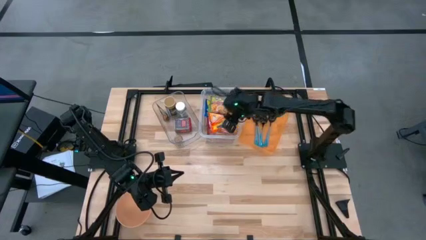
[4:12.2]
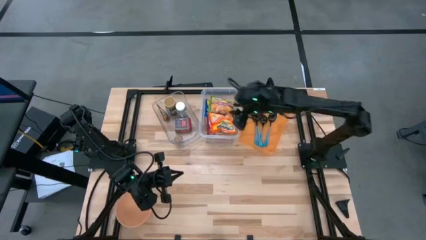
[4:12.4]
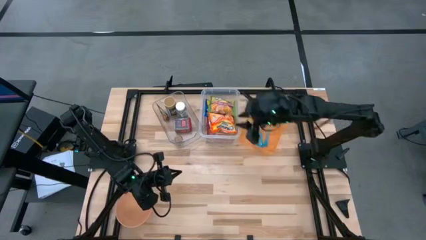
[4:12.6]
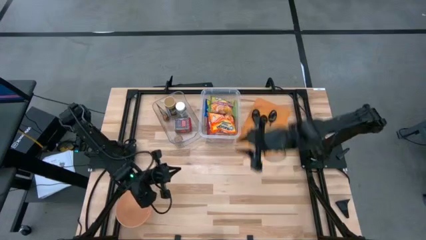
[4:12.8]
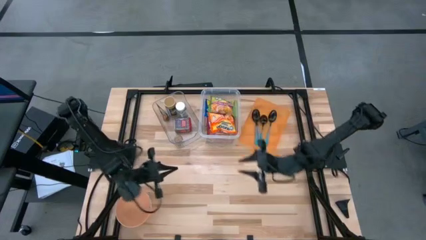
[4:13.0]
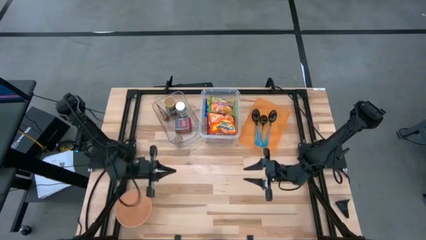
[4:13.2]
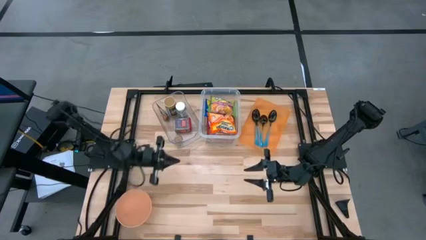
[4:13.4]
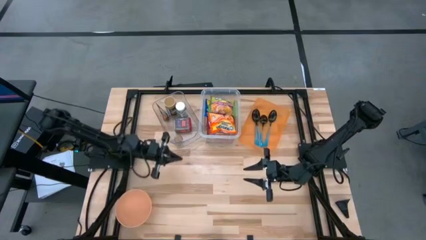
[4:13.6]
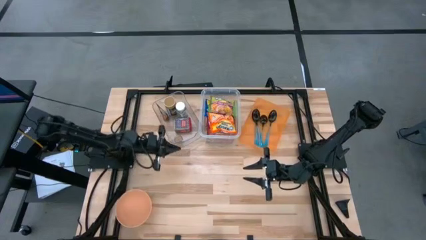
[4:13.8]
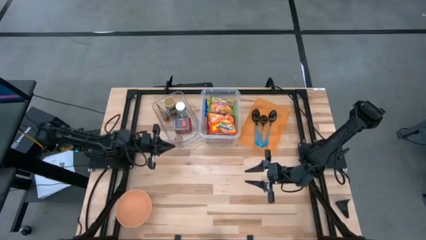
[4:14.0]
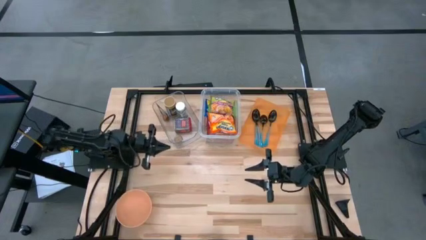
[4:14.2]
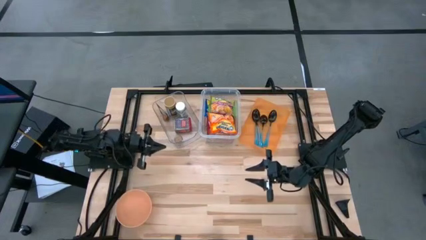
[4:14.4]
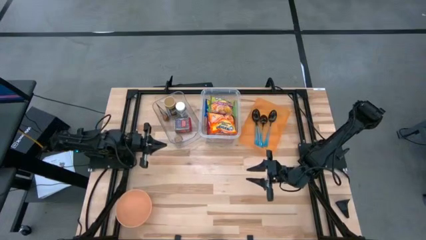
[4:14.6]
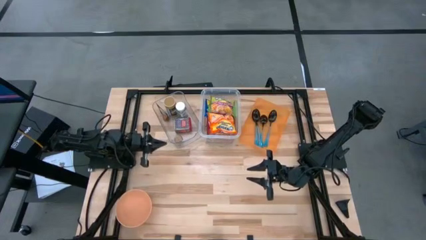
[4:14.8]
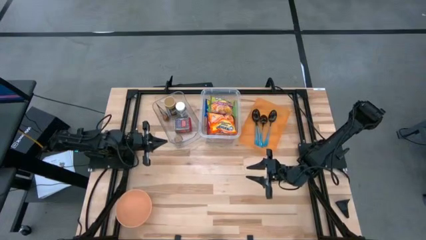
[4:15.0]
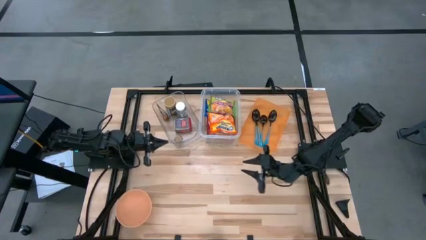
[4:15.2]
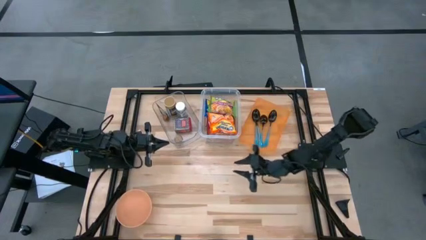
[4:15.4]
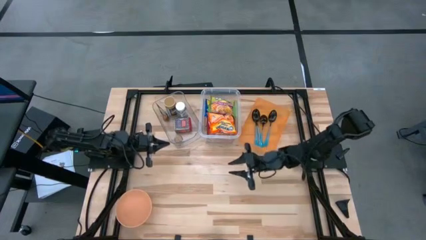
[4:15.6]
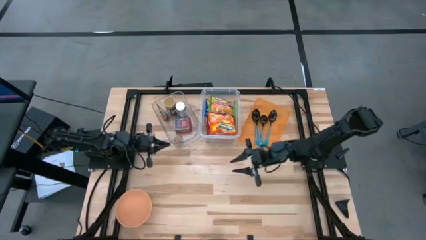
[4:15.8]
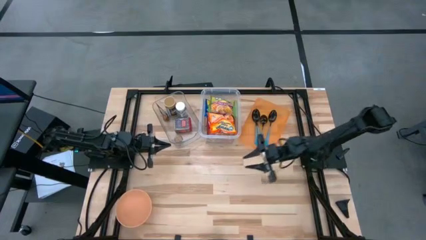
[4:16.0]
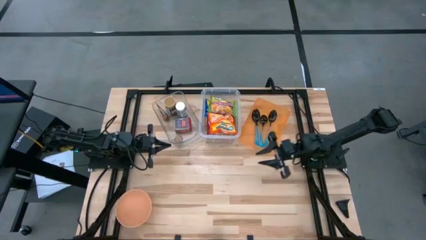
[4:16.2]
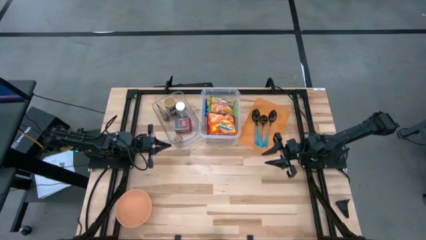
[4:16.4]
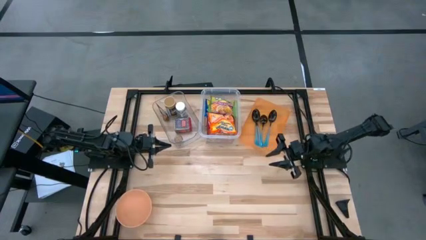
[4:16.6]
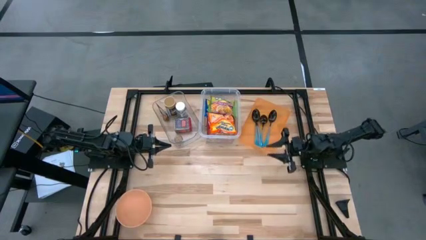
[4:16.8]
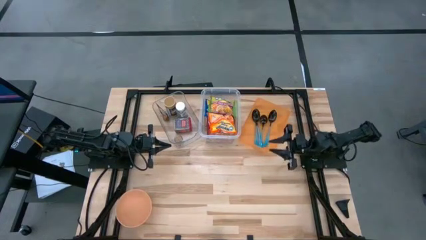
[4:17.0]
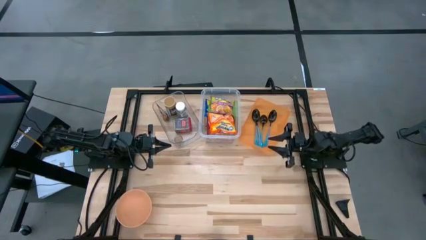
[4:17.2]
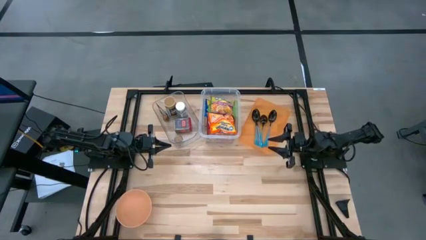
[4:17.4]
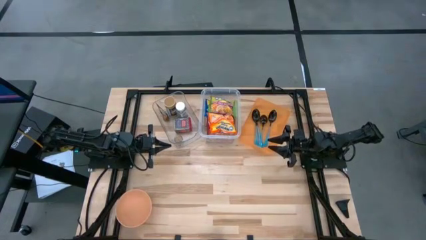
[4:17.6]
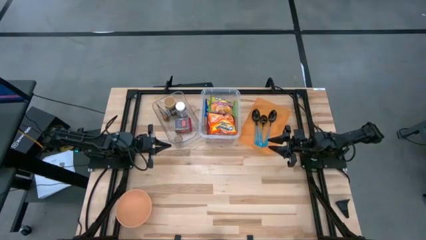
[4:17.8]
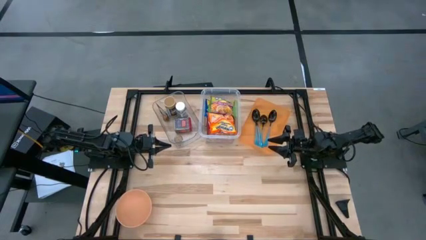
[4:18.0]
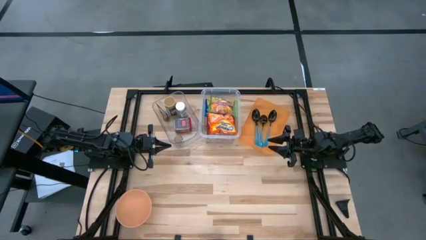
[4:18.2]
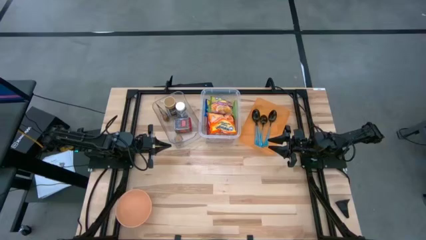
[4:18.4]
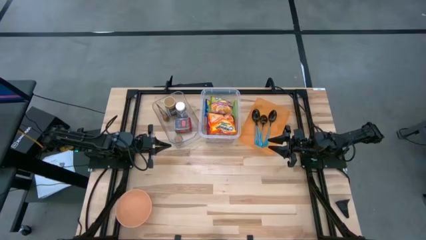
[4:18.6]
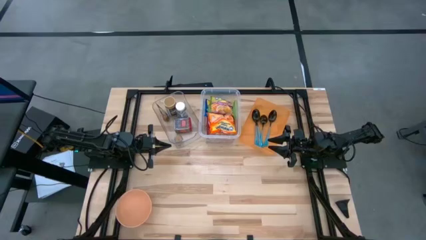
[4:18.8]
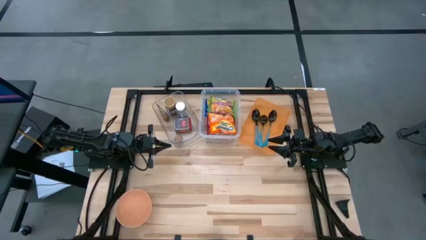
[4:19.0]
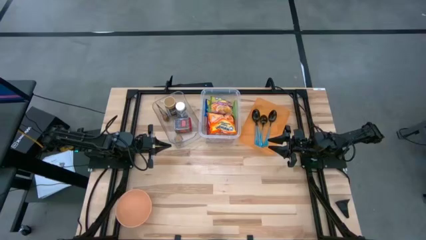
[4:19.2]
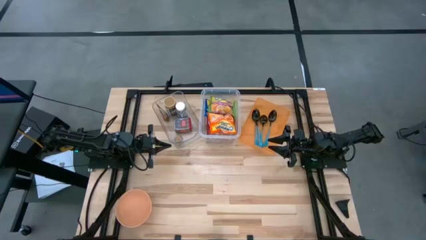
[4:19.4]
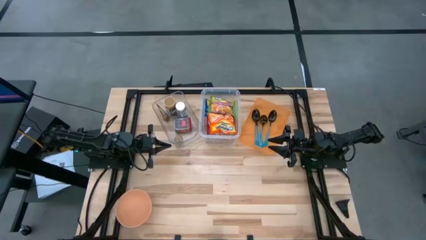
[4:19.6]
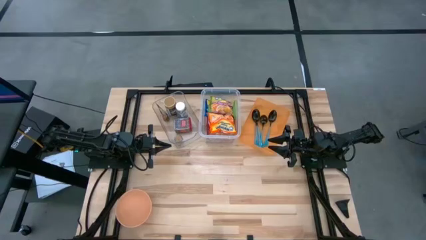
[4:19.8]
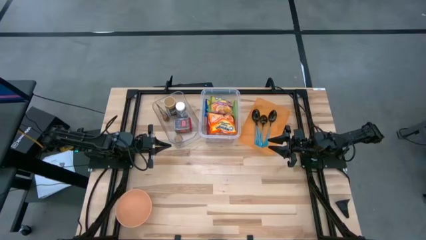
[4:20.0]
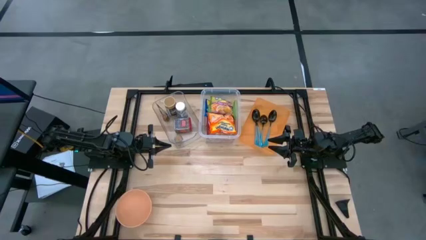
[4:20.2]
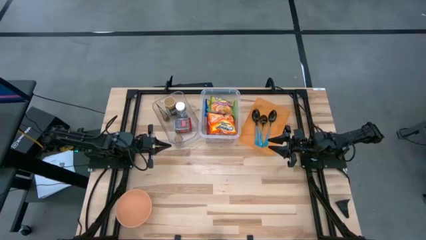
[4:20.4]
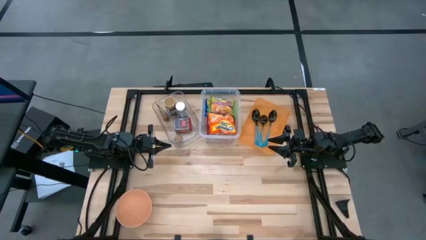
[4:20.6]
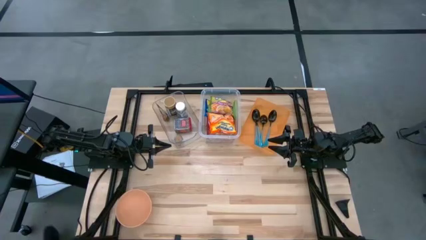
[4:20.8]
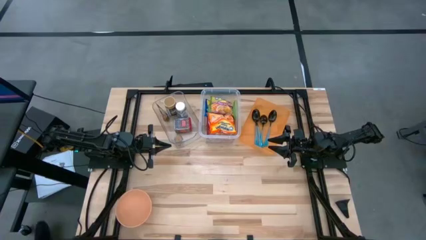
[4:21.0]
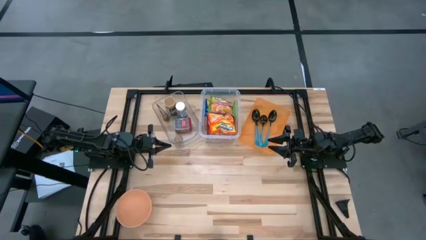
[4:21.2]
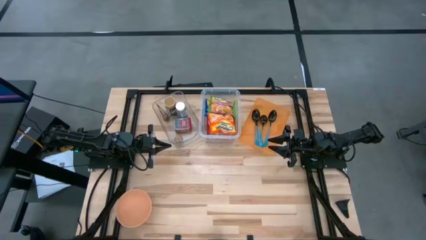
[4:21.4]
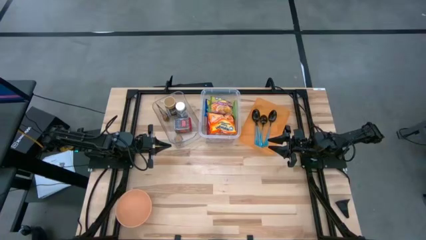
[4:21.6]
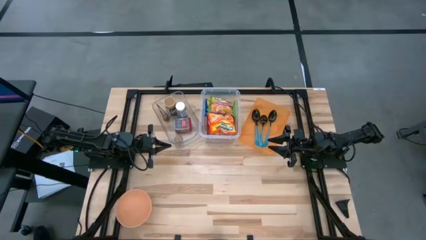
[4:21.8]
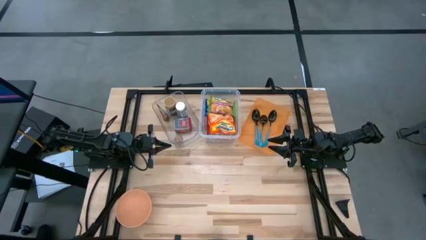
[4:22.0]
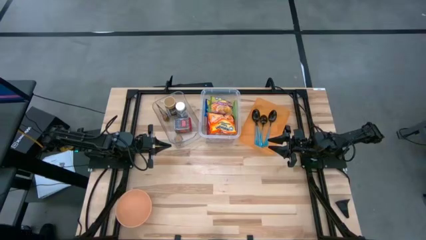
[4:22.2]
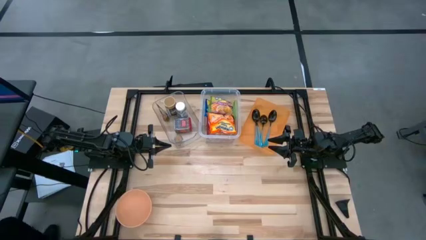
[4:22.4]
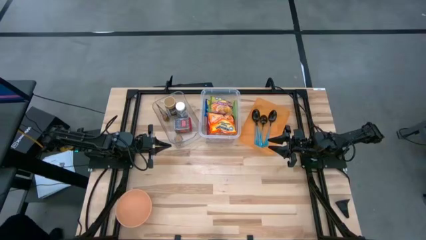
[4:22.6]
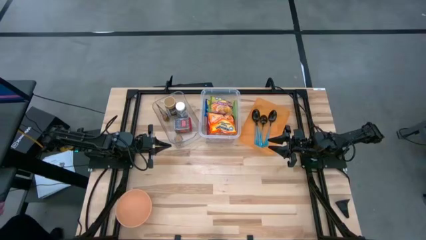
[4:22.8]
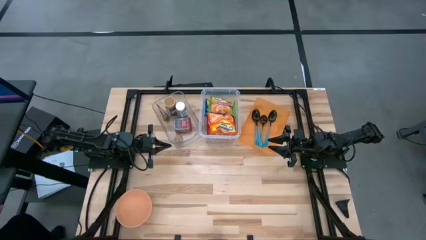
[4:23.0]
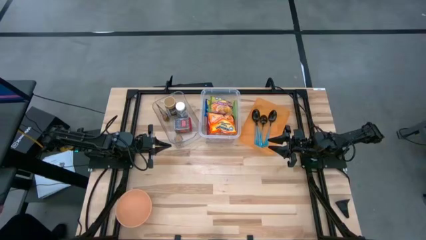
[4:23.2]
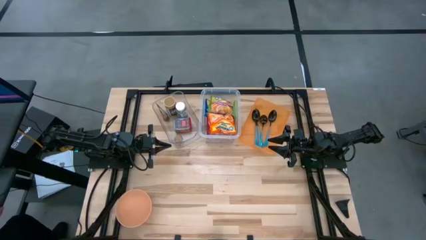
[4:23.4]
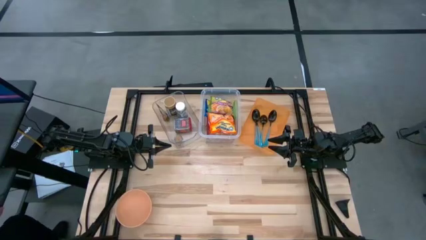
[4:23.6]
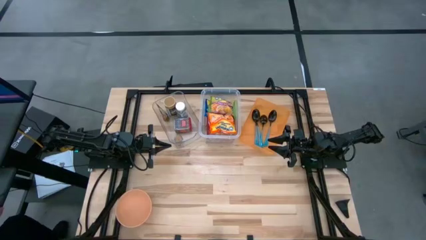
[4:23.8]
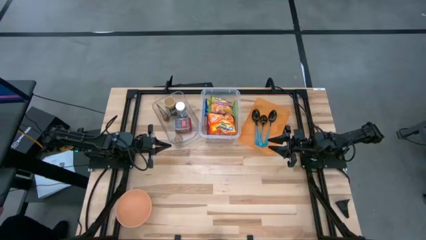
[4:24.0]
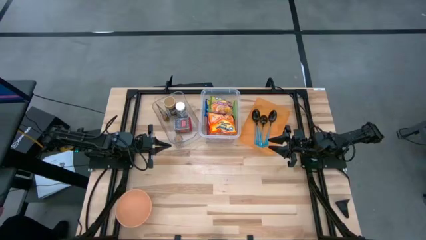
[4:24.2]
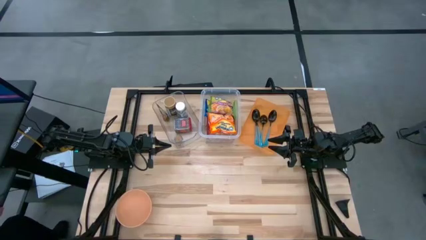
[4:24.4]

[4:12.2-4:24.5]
Task: Pick & Place Food Item
Return to Home Position
